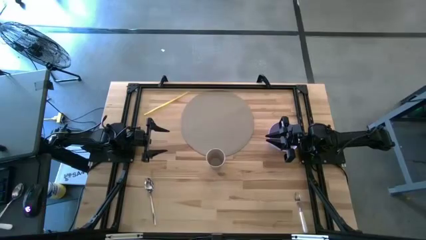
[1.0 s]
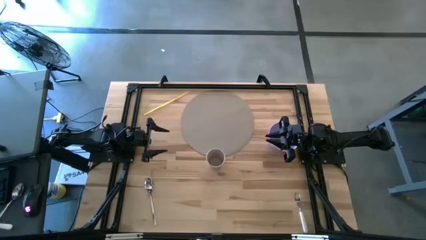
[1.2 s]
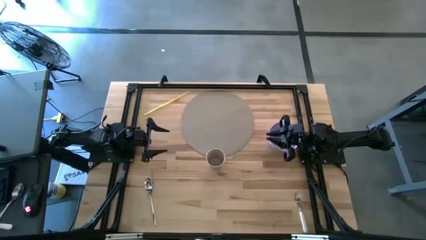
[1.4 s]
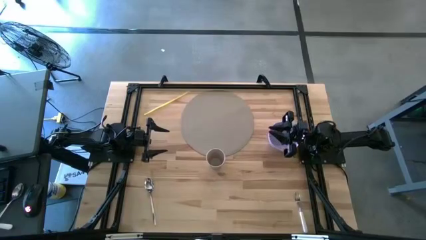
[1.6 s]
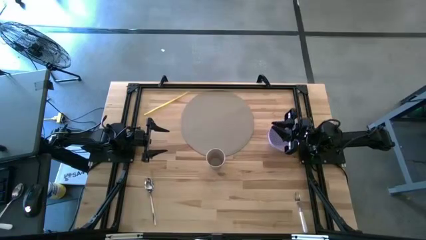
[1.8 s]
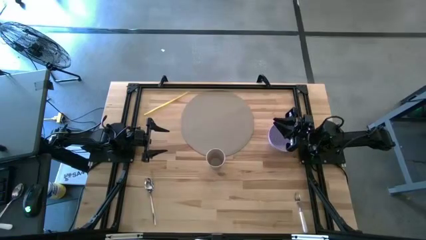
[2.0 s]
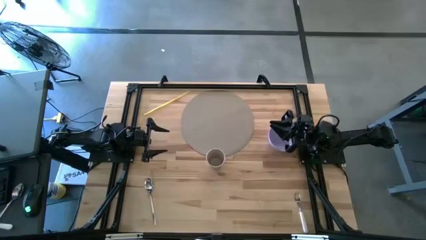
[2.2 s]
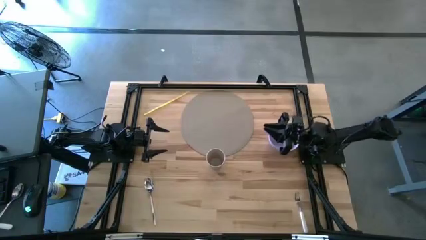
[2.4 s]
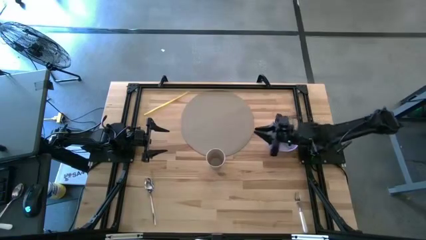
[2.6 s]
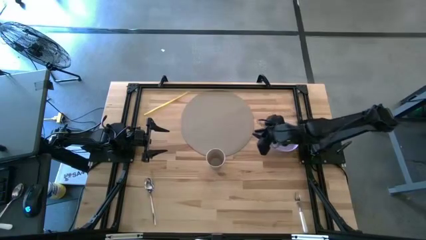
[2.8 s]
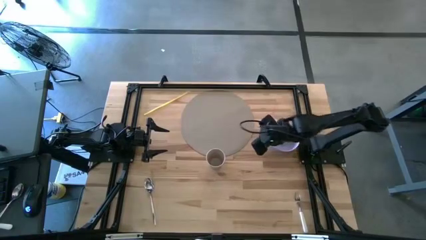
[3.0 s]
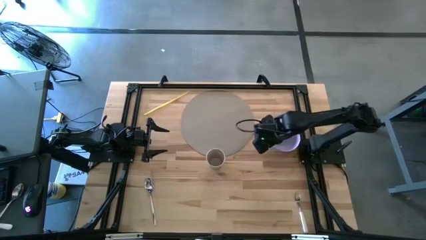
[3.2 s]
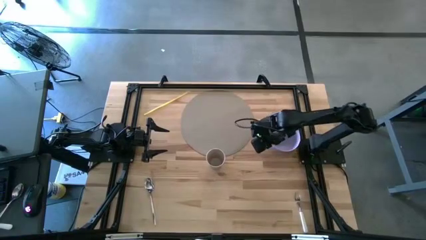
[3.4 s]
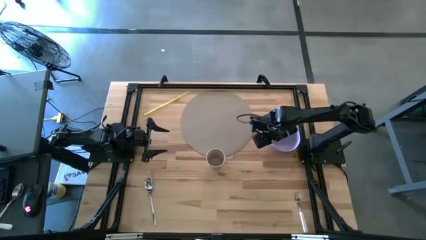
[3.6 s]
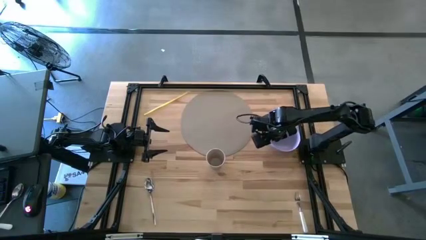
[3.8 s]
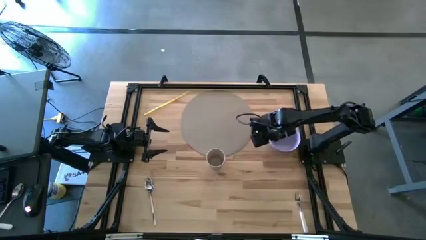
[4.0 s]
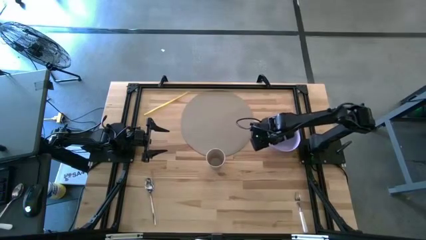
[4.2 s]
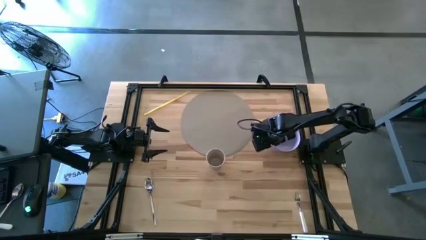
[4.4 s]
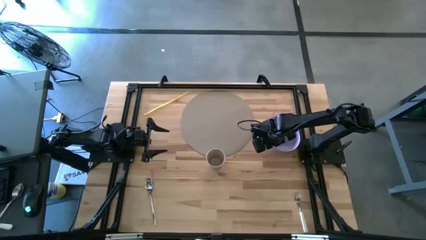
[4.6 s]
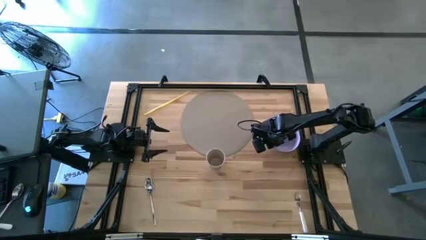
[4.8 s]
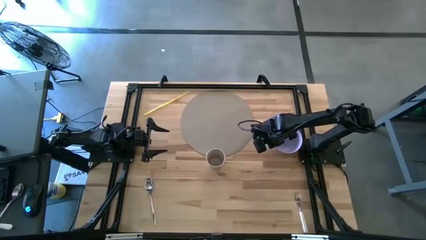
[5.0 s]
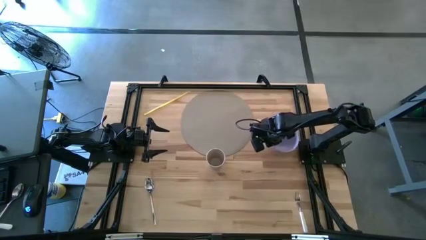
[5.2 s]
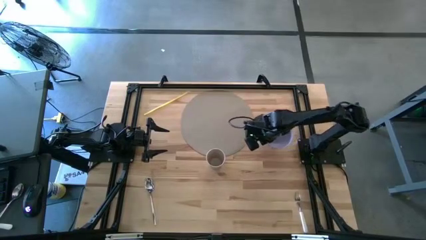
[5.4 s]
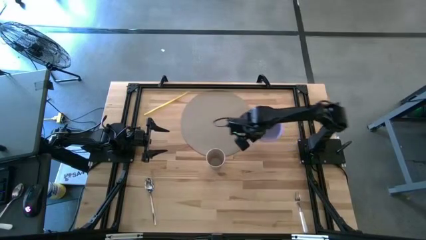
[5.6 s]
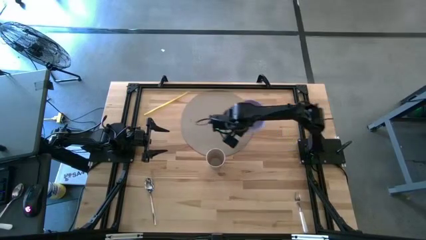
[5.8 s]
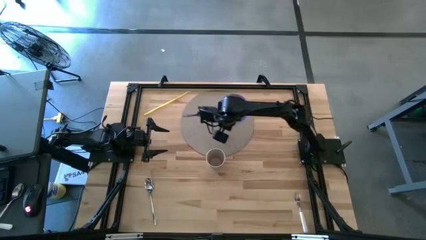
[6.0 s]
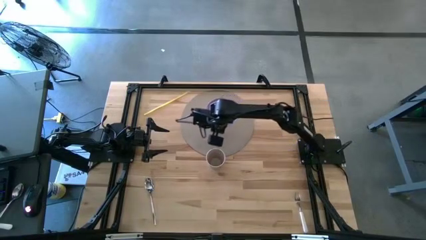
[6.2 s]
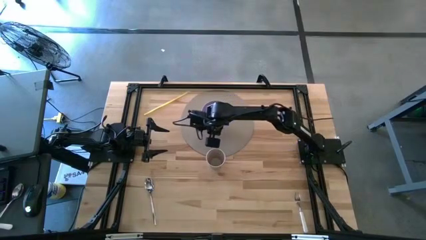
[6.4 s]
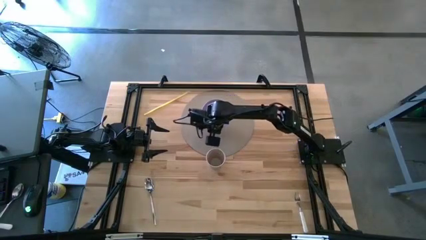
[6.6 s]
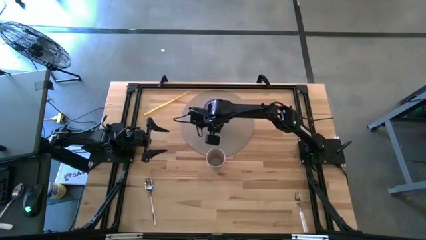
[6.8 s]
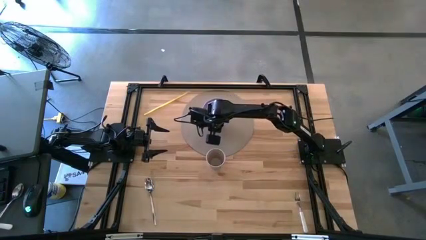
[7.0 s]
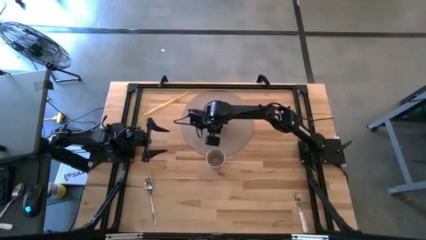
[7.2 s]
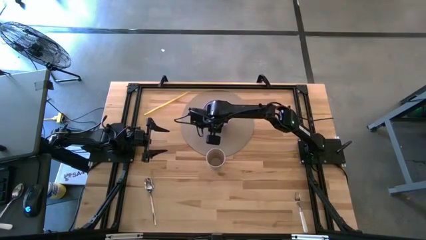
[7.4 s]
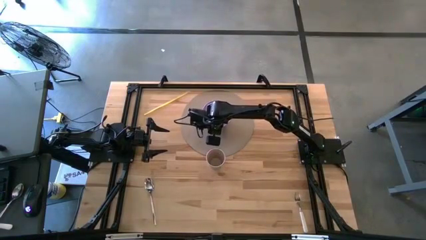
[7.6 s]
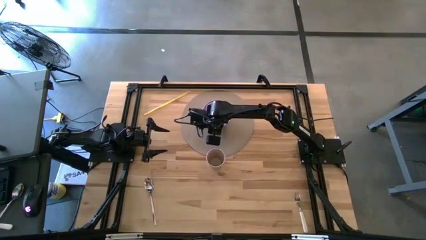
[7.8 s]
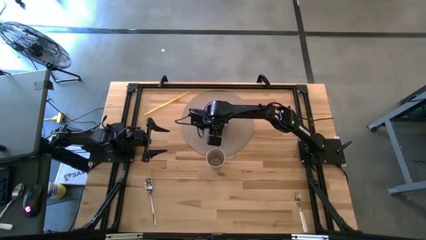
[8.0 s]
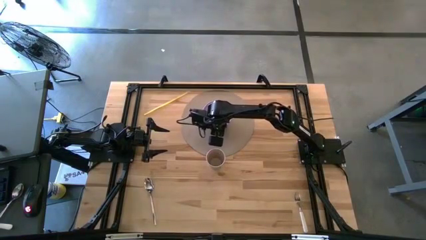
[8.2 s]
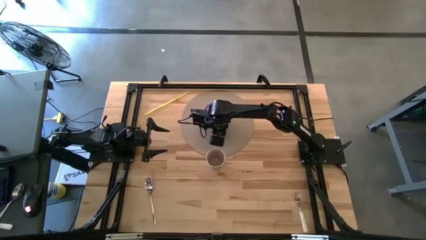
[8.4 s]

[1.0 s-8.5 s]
Task: Pick & Place Utensil
Put the purple bowl on the brown mat

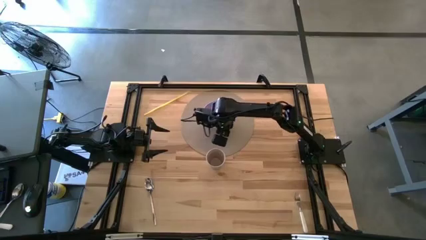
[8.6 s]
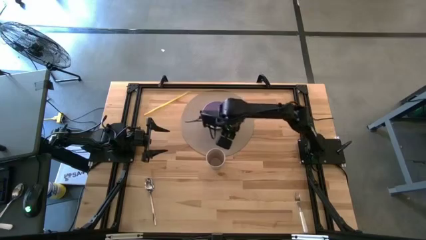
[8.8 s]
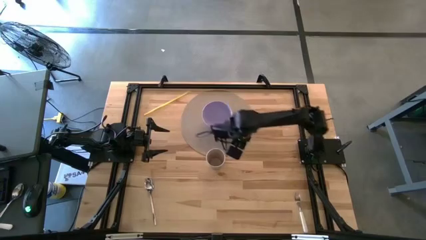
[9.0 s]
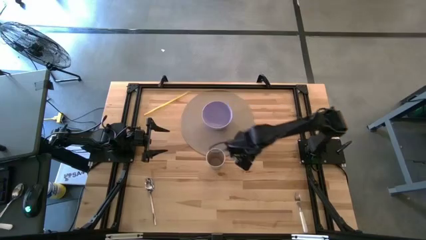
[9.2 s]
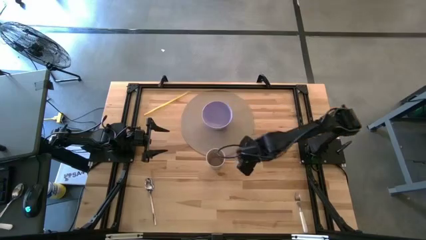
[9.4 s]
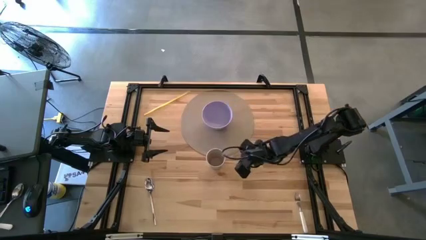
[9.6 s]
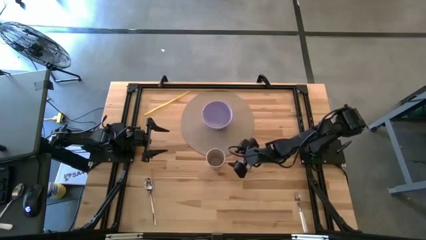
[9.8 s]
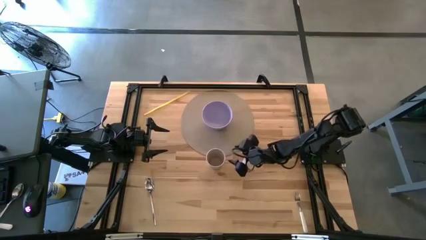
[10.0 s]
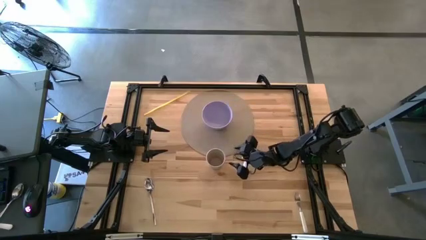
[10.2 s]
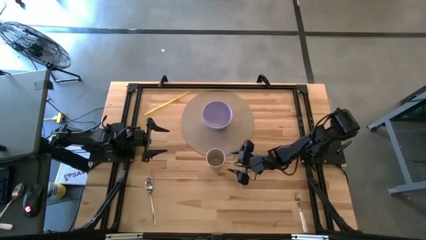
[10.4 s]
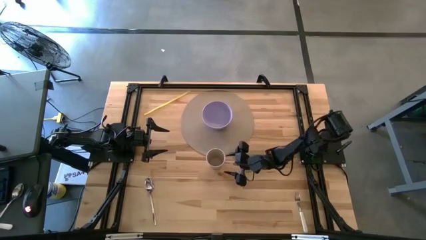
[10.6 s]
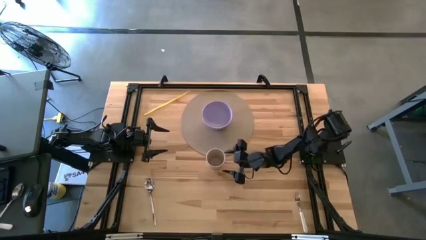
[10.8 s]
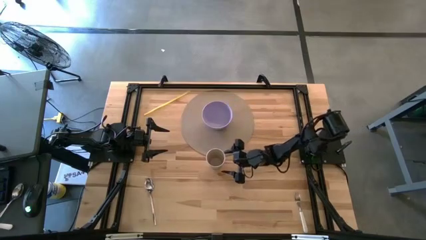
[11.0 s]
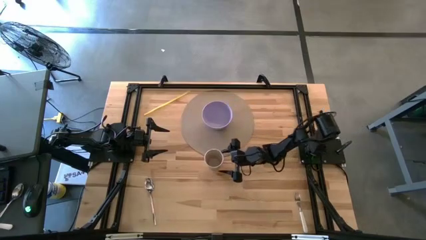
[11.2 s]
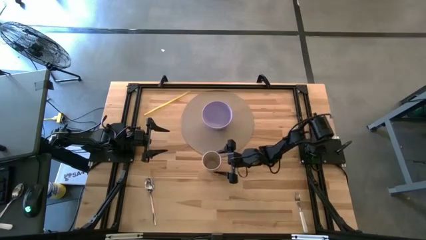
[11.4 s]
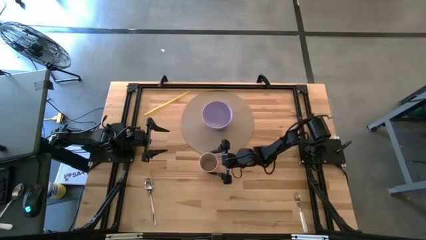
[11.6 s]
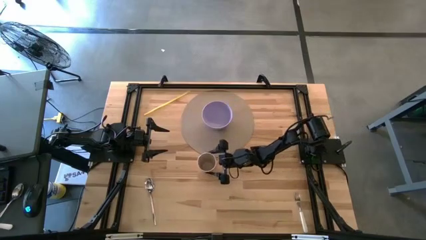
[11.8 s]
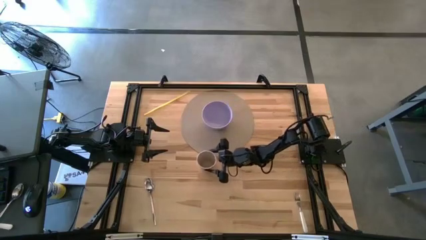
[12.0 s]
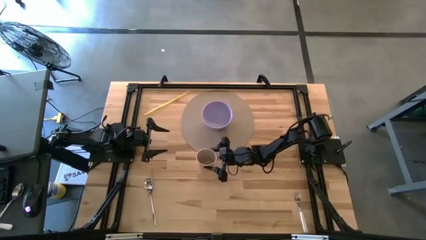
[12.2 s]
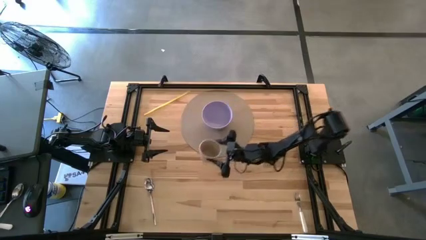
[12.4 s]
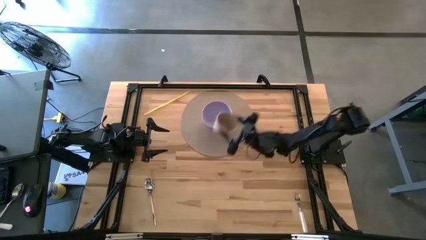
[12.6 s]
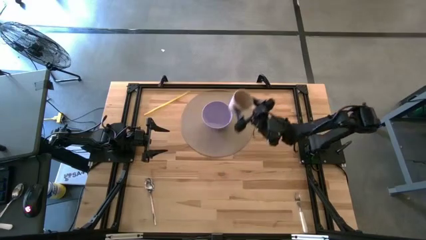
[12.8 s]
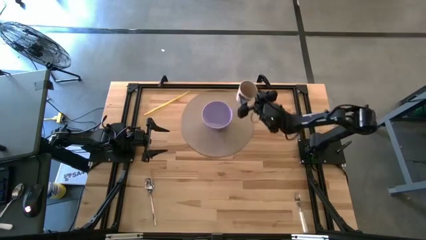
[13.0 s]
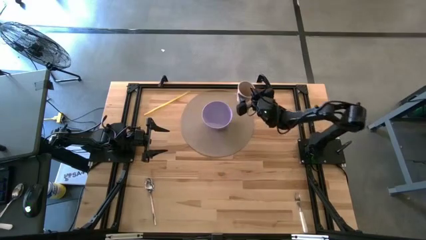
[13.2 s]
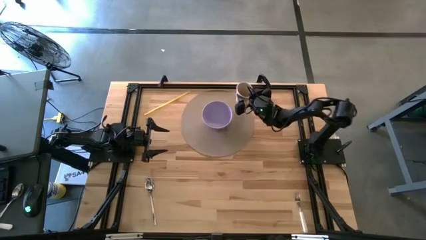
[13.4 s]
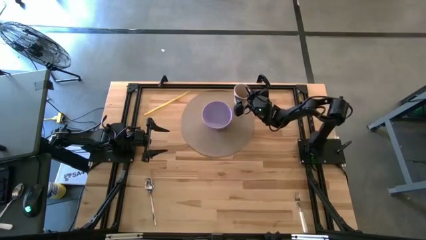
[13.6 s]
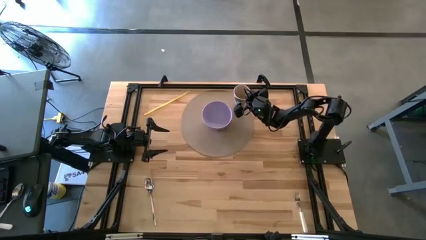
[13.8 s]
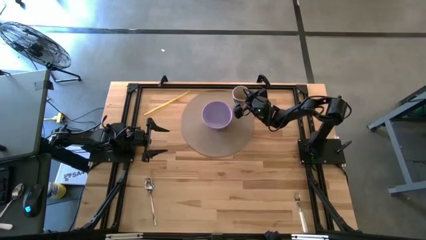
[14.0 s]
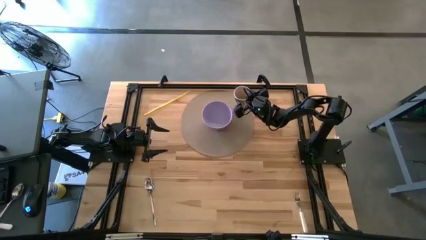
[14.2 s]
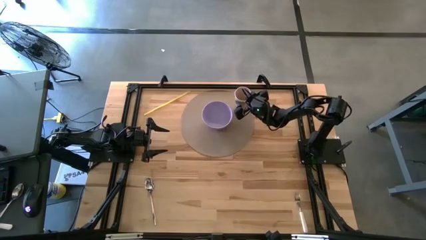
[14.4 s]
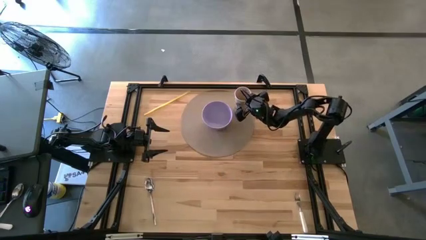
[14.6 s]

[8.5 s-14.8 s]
Put the brown cup to the top right of the purple bowl on the brown mat
